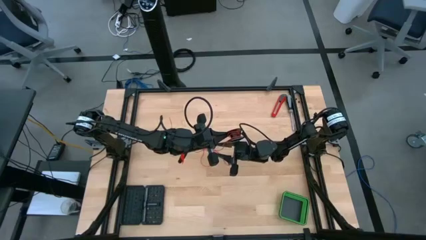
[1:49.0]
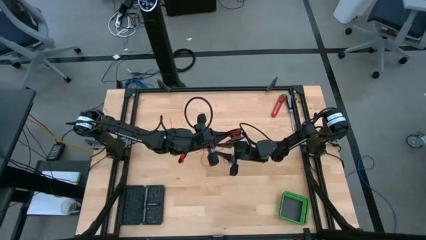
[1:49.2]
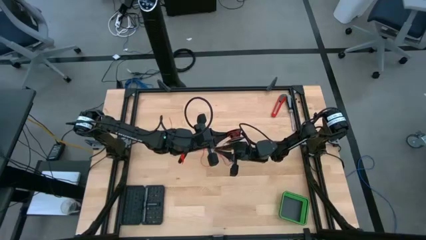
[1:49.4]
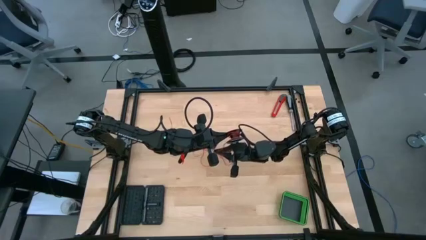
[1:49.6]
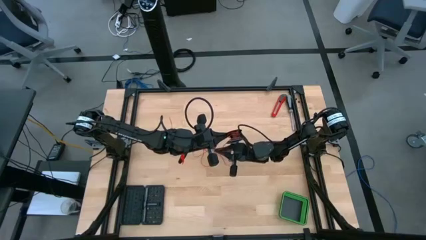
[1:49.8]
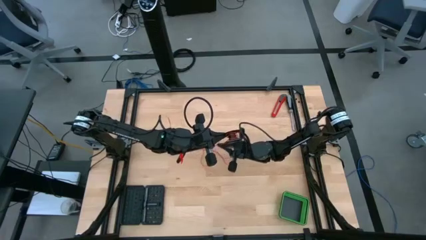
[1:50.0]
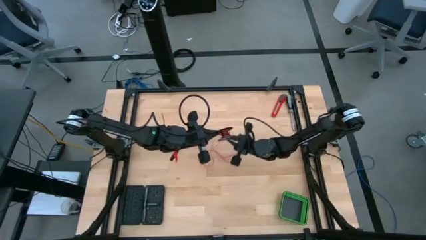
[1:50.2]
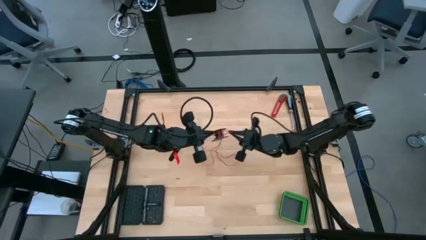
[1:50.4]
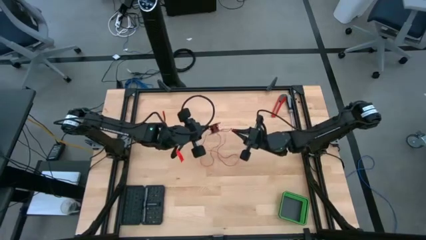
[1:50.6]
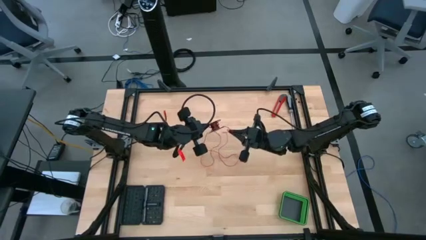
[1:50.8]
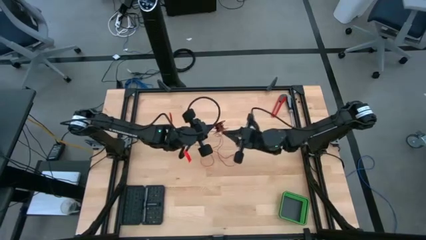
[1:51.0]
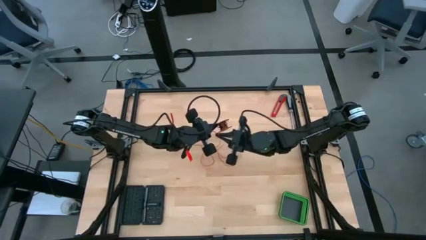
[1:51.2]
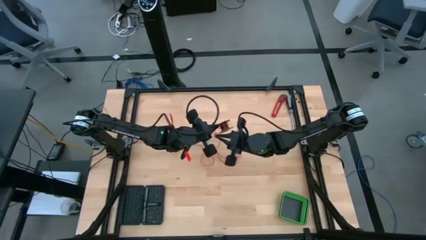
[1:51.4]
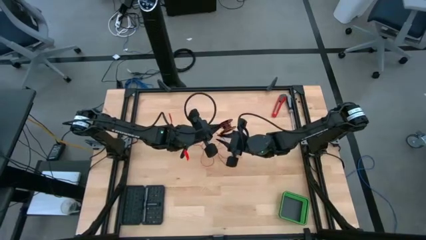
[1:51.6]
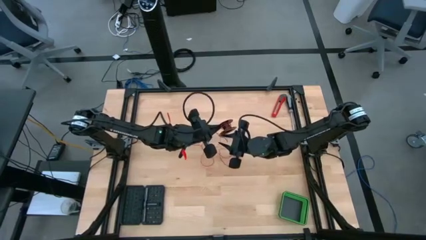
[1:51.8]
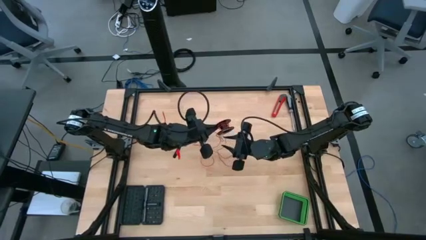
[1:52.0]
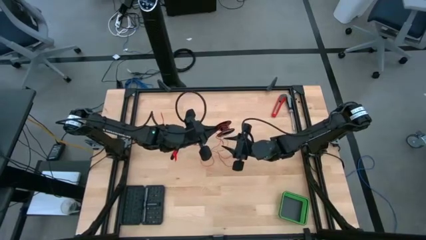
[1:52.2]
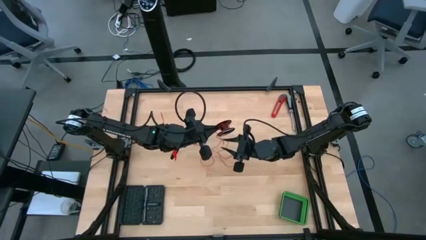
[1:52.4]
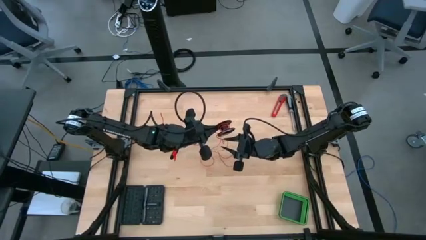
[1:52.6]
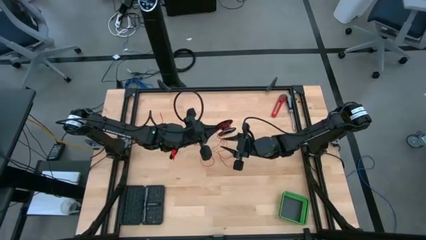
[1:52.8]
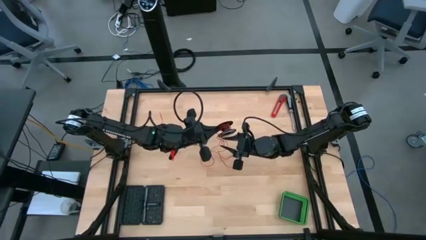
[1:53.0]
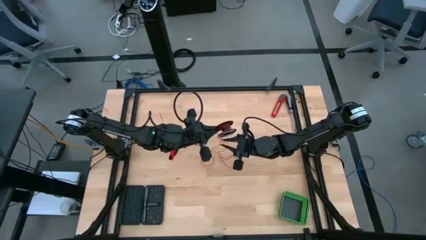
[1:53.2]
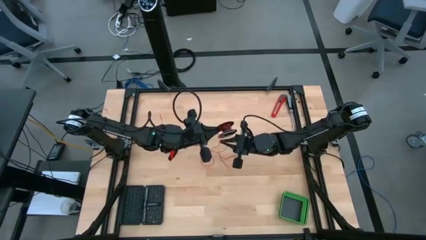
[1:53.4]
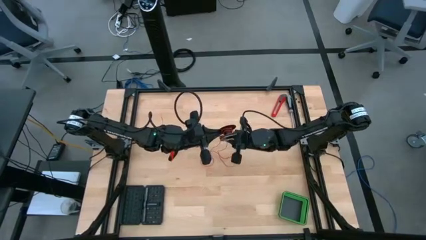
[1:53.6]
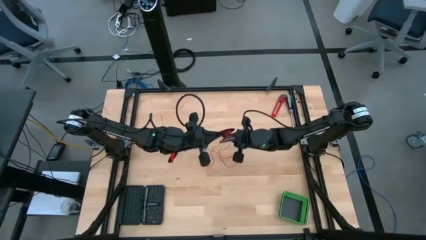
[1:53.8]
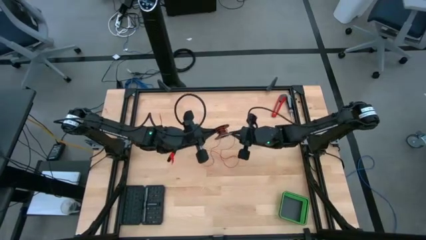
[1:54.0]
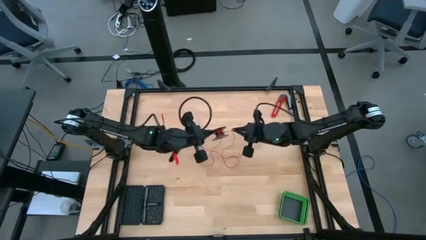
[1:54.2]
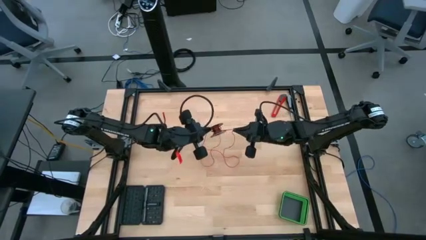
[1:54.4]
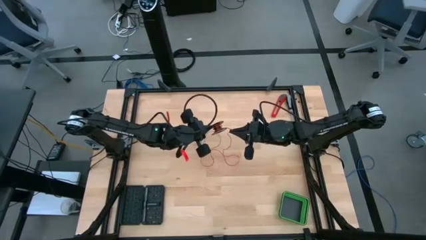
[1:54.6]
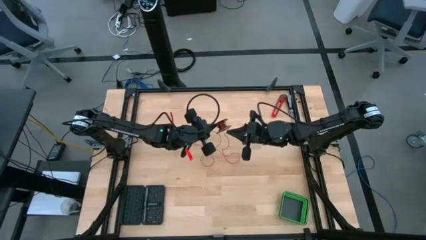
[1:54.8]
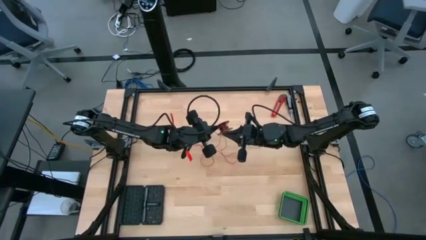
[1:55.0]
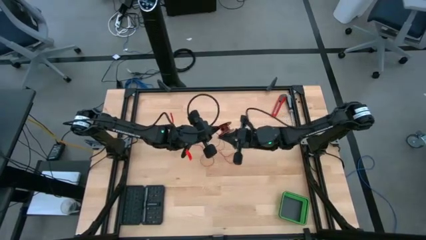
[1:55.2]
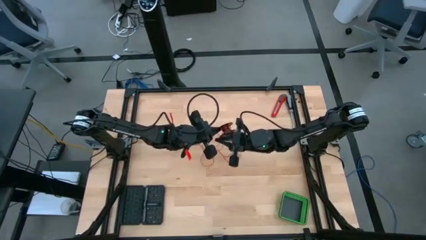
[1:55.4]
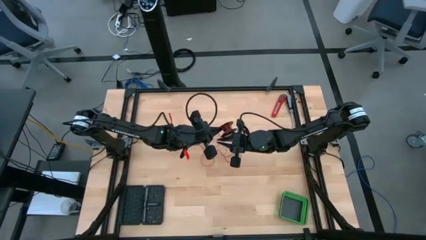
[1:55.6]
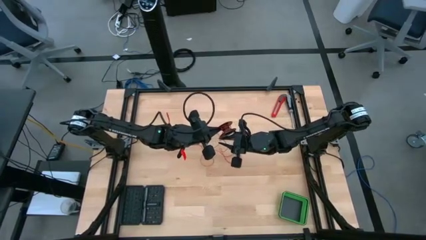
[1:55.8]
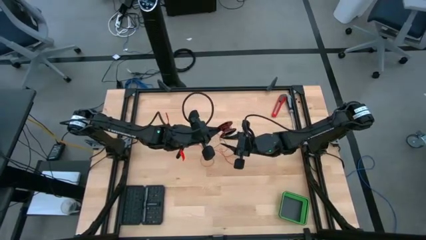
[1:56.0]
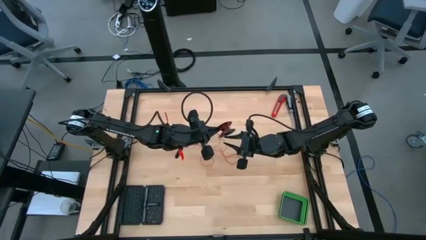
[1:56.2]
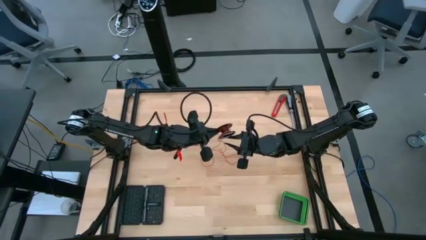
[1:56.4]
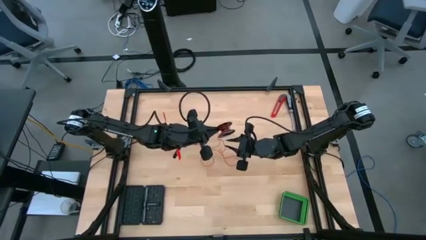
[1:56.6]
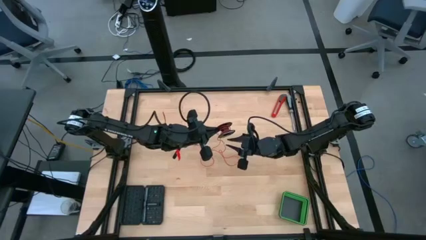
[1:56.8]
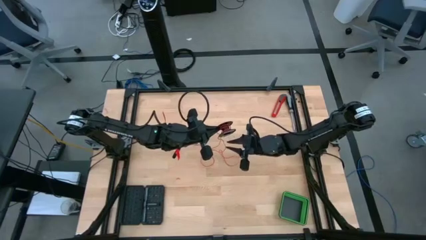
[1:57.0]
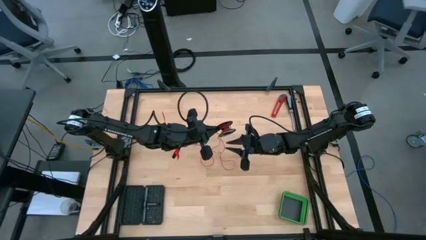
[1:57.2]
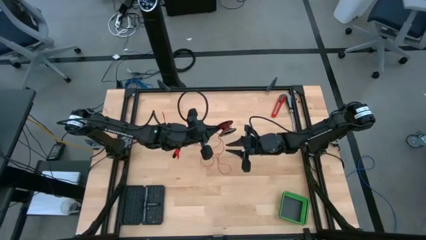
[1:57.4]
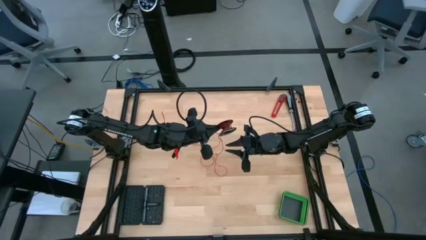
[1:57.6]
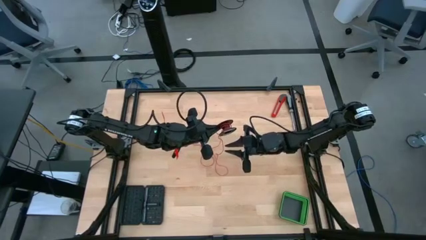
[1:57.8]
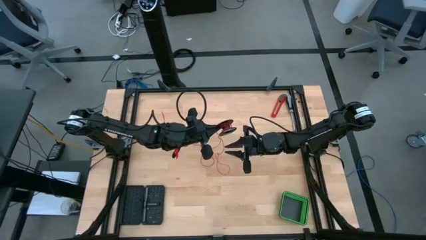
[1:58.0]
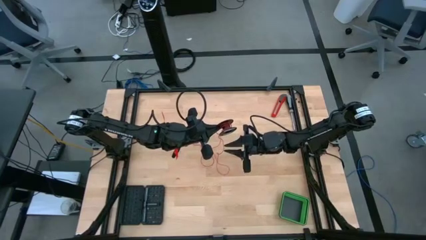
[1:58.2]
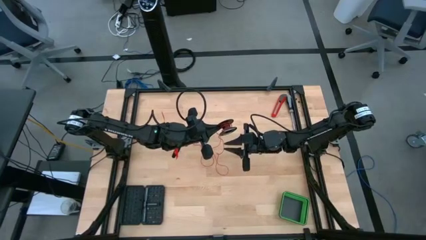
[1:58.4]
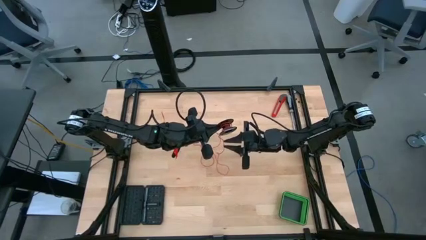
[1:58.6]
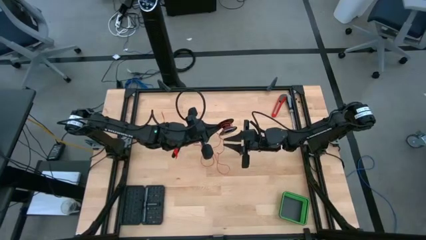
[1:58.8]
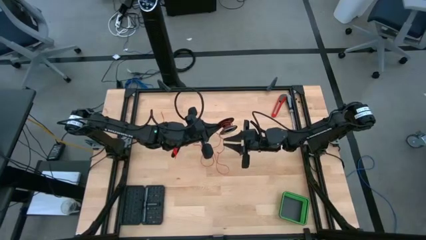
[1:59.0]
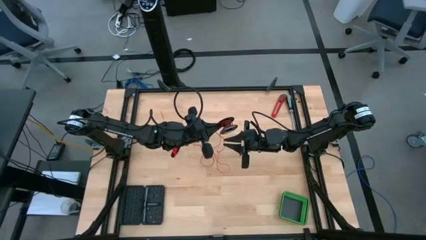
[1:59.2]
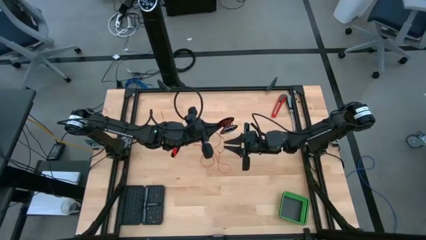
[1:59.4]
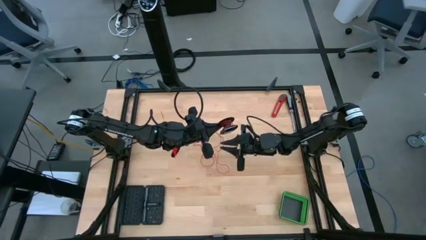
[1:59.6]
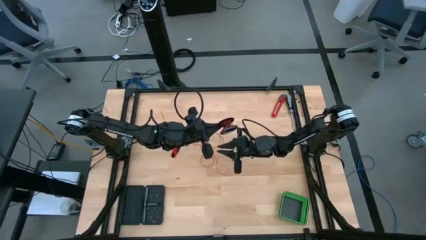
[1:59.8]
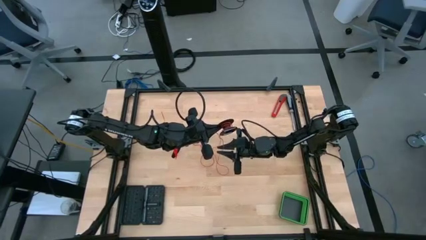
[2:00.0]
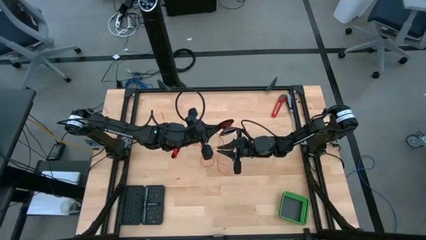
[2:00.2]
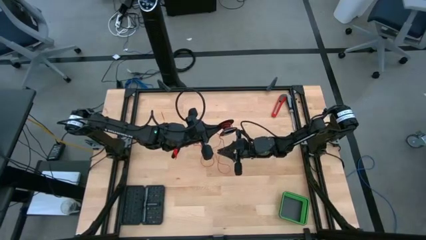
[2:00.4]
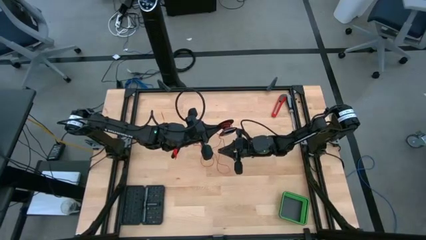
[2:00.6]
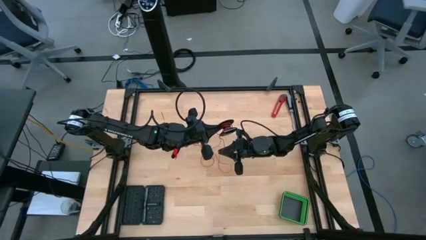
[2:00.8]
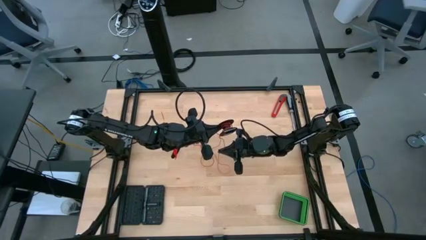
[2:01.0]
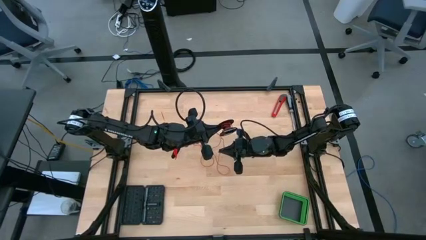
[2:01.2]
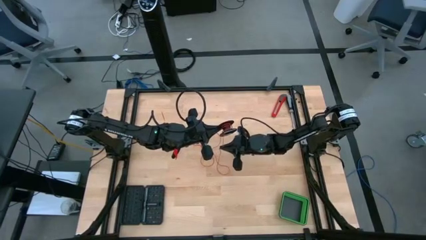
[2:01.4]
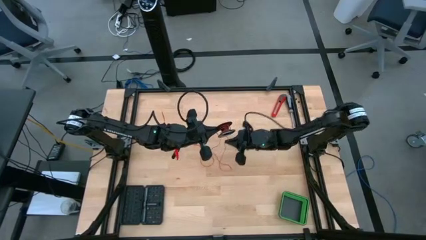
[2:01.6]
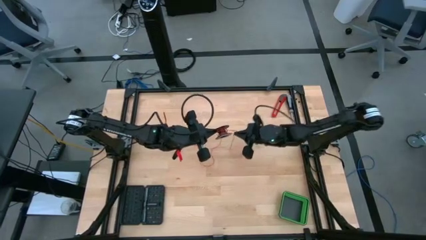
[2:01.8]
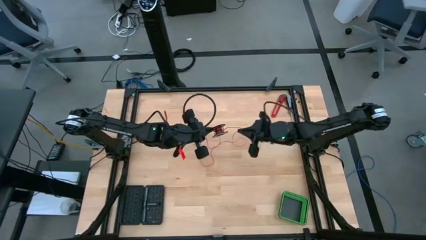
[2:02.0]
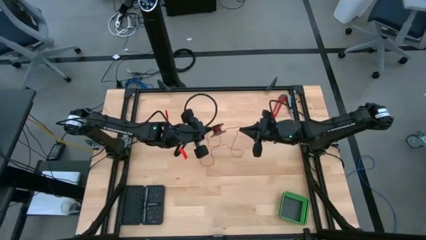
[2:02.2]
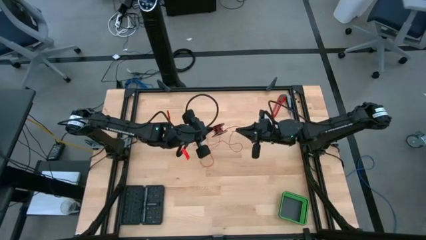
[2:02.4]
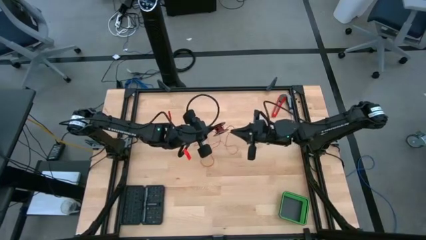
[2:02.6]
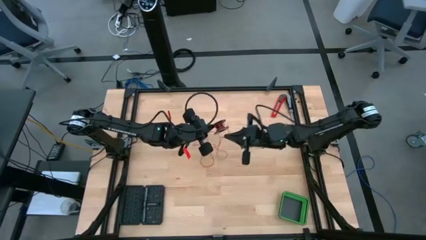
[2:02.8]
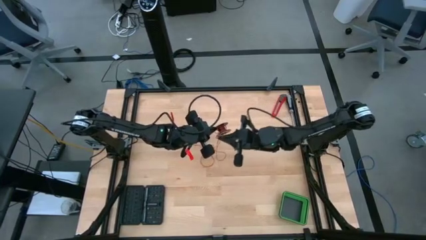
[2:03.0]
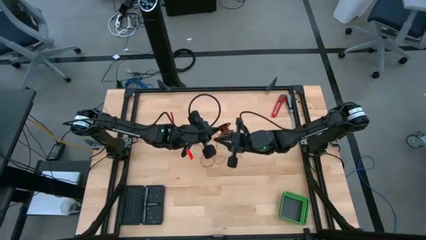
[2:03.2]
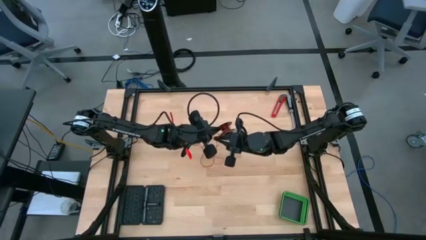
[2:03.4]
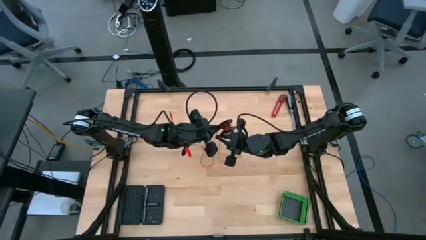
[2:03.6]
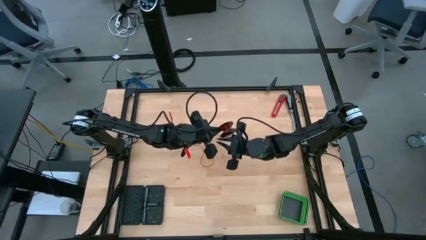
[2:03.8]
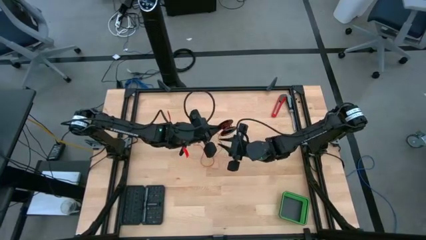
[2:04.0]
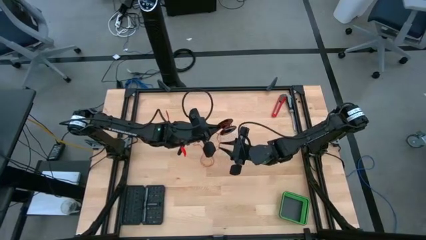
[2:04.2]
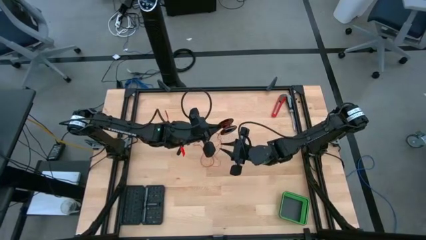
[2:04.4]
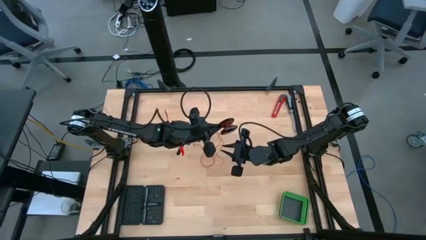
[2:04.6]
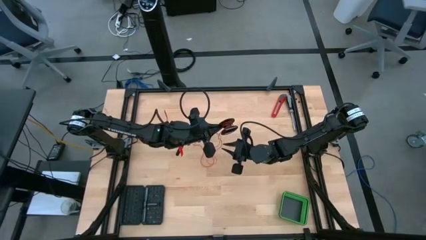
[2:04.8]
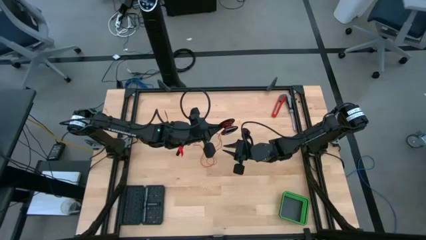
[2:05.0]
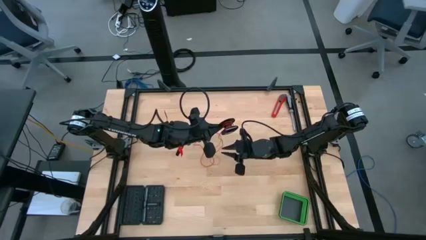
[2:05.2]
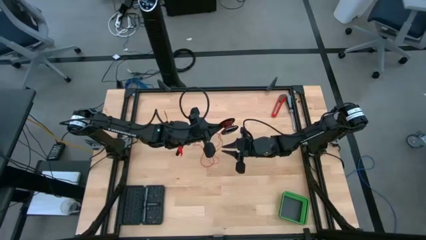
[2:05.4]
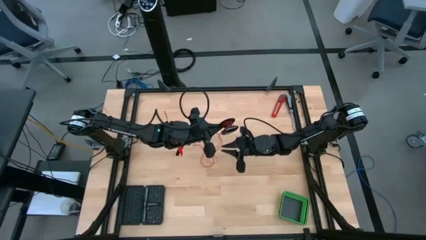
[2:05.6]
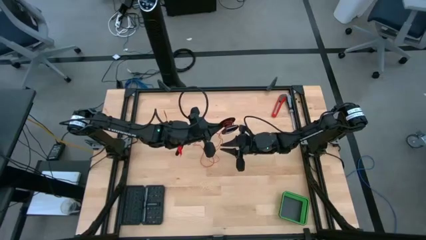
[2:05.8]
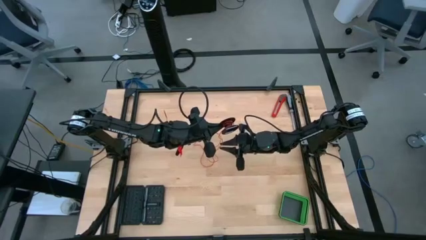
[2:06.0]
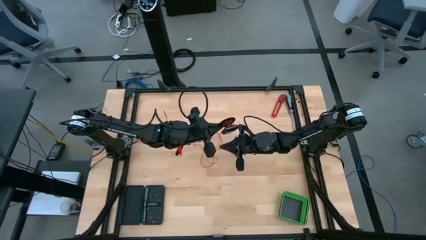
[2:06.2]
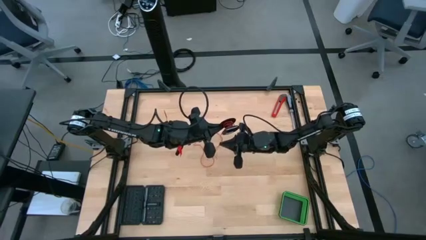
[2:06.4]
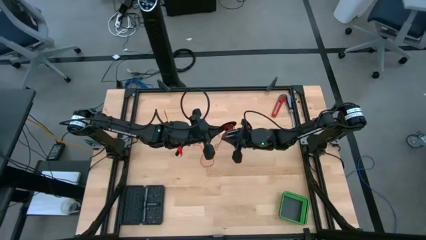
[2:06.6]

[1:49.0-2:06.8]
Task: Coil cords
Coil the red wire onto the black spool
